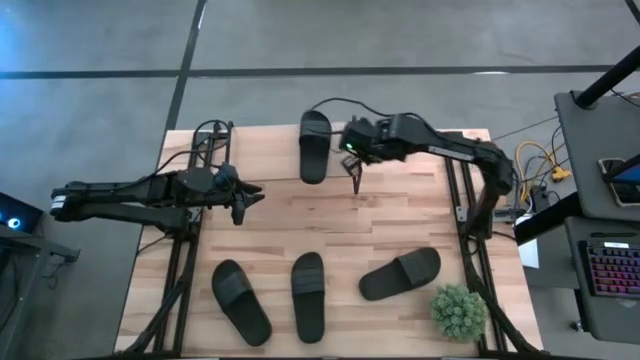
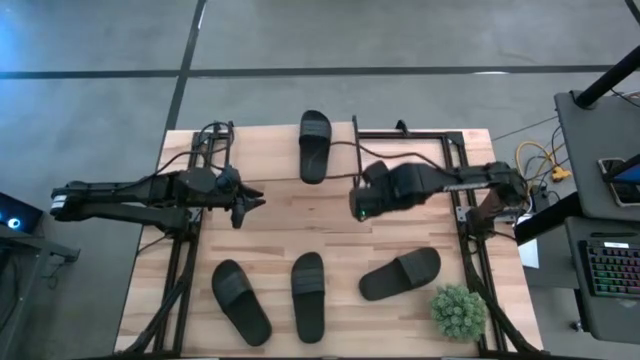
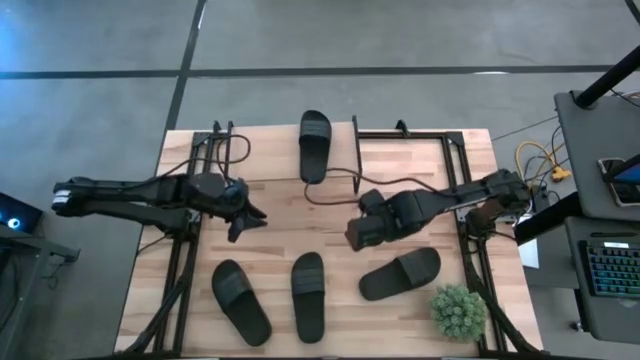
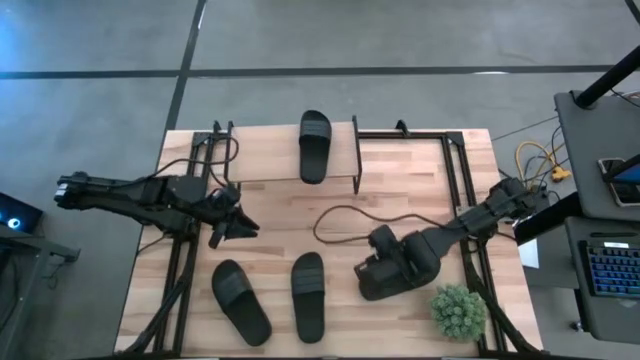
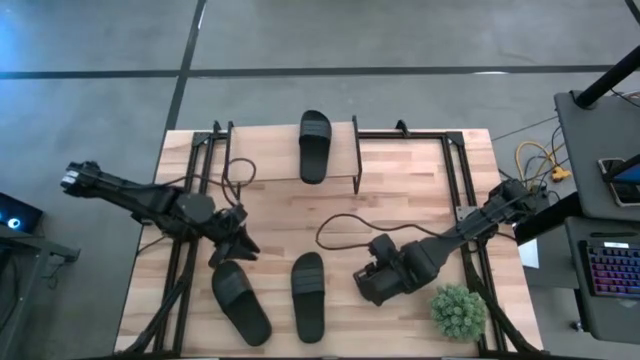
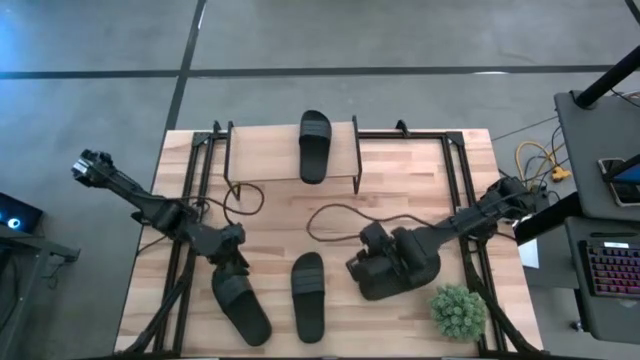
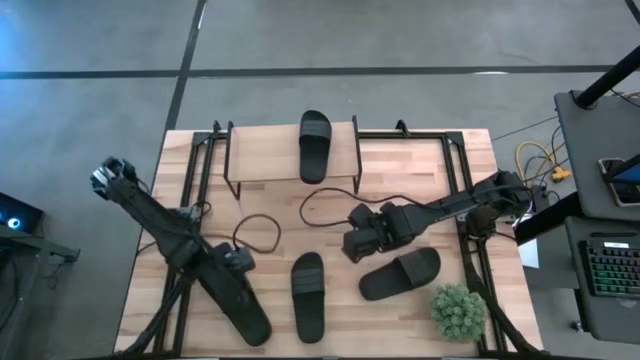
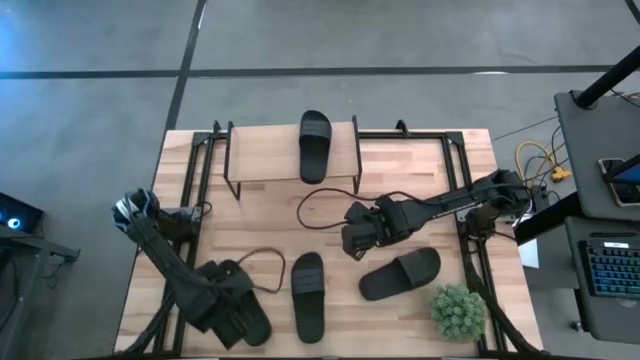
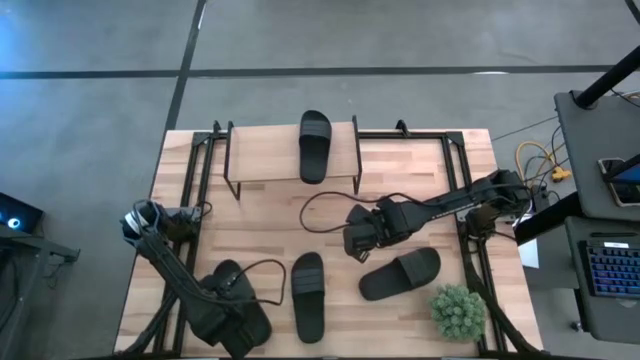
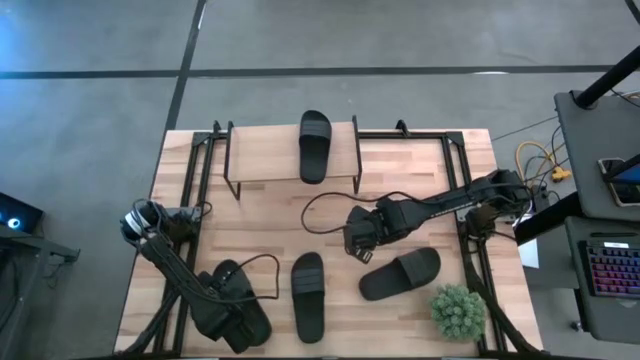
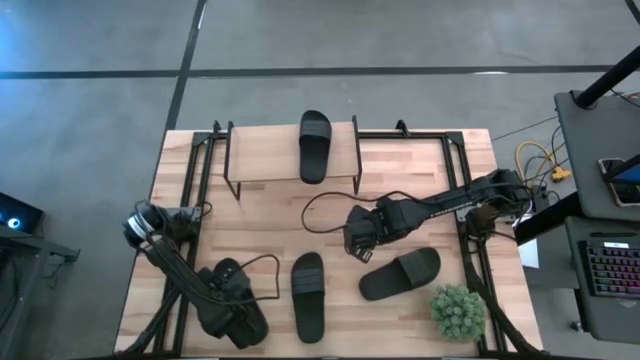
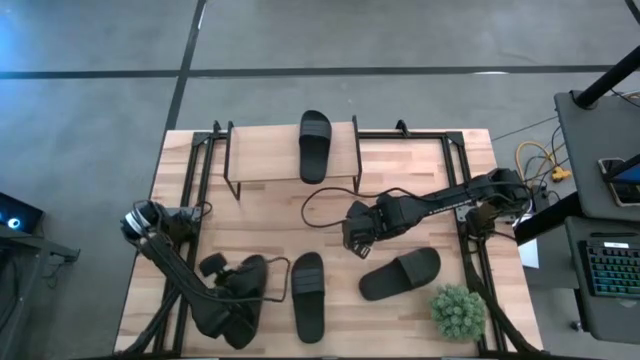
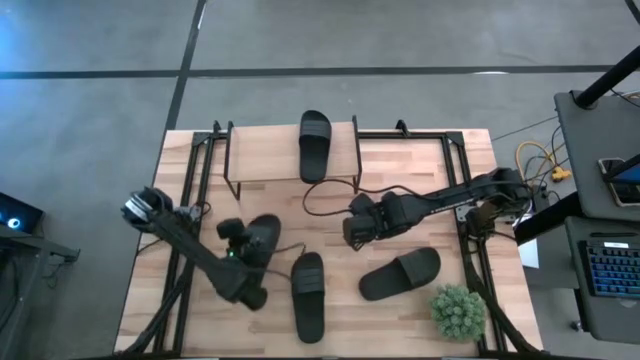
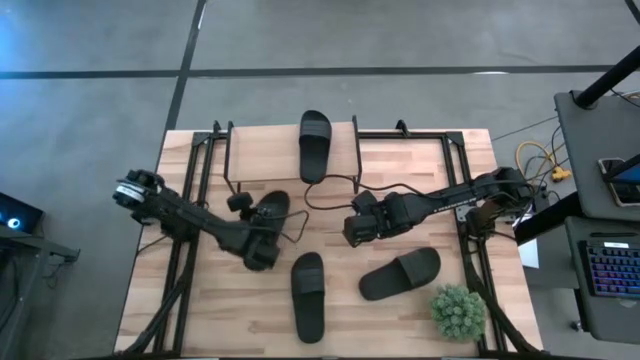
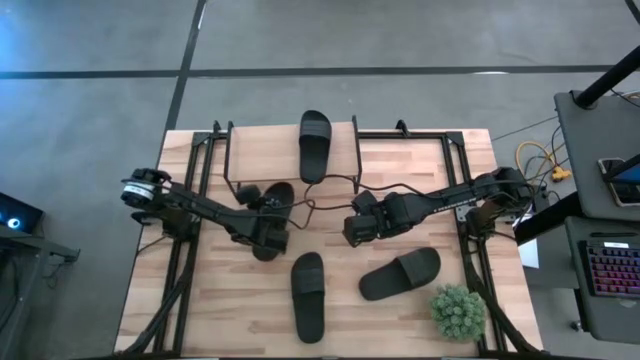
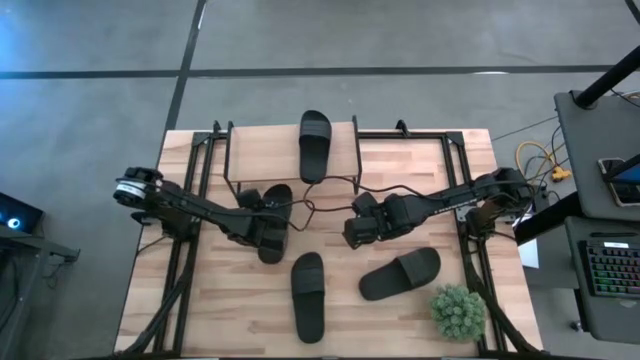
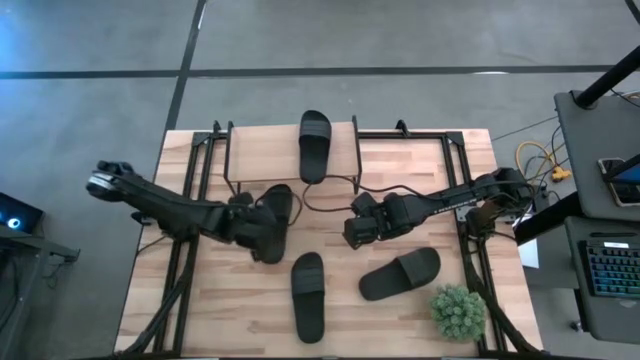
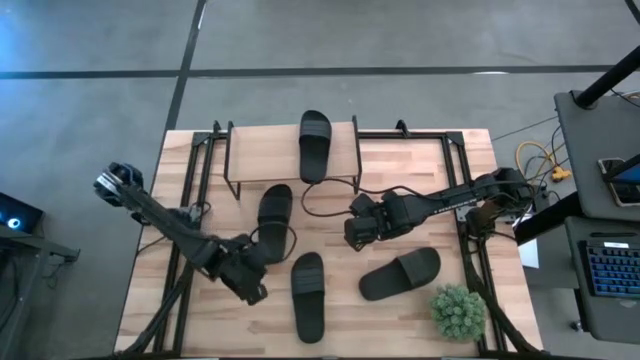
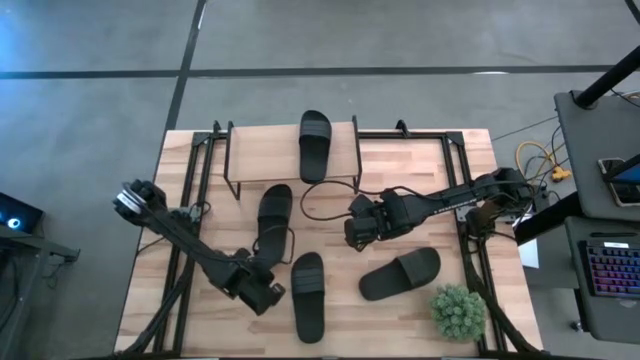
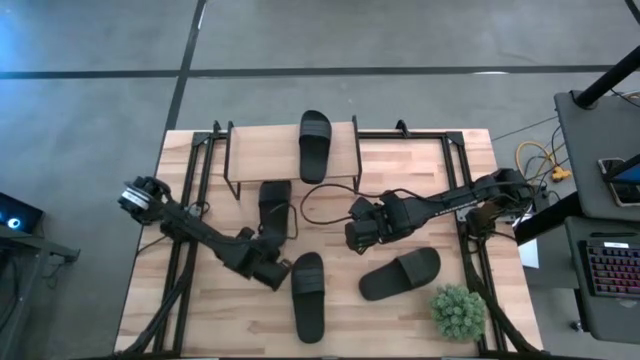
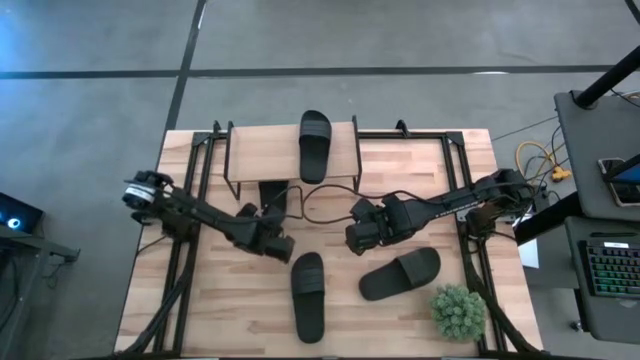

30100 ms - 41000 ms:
Task: Pick and place slides into the shelf
Put the left big black slide under the shelf

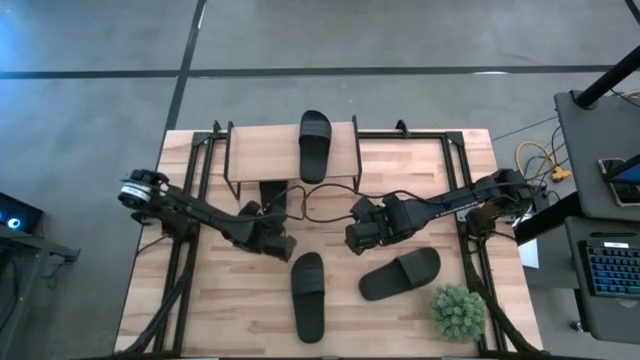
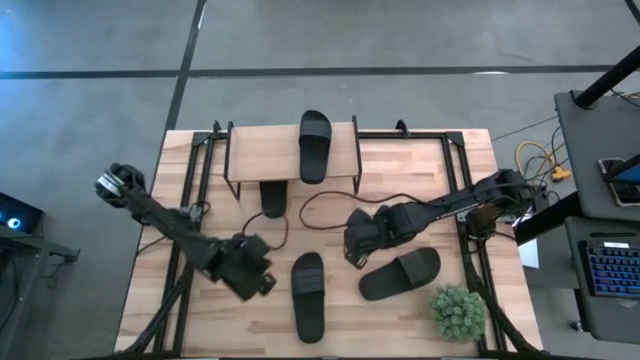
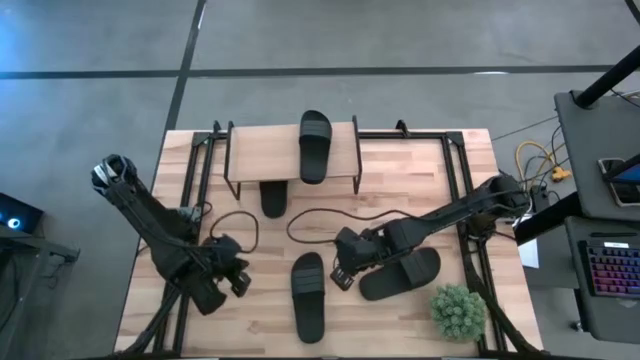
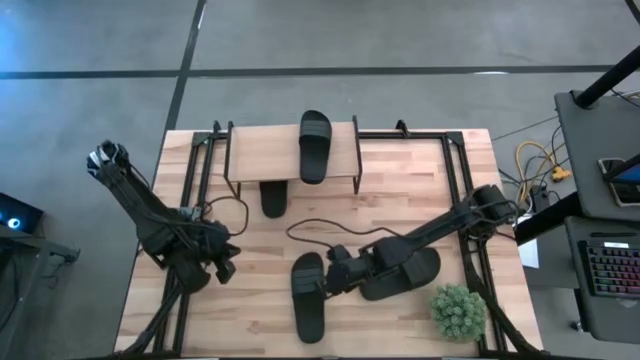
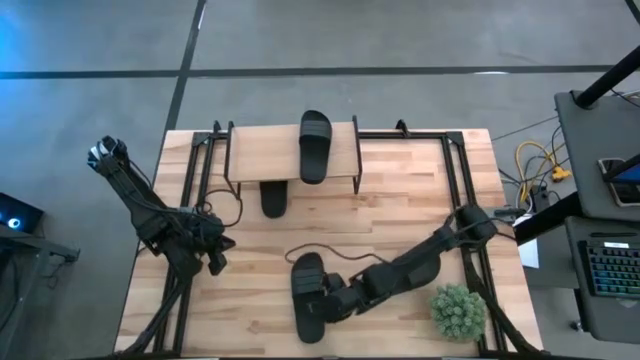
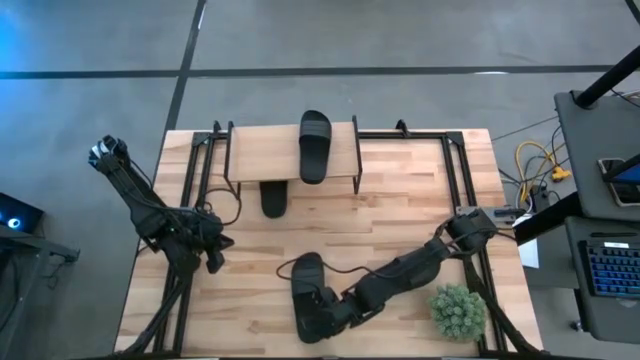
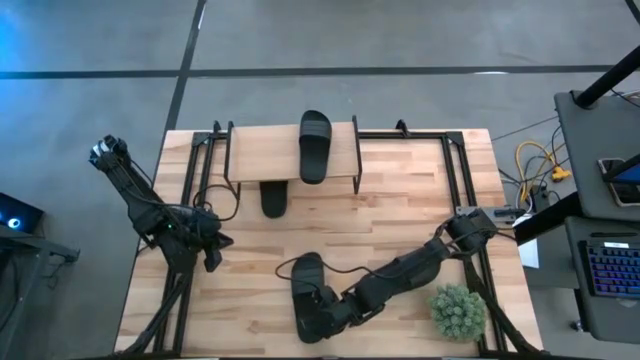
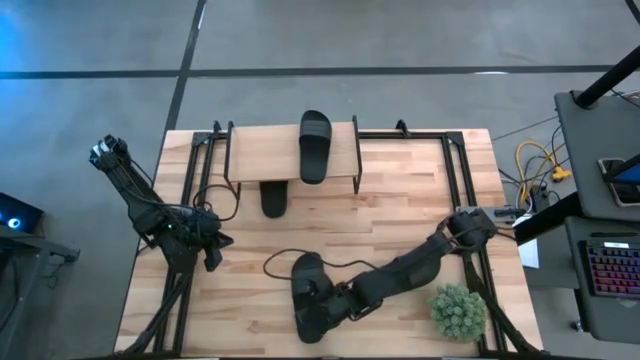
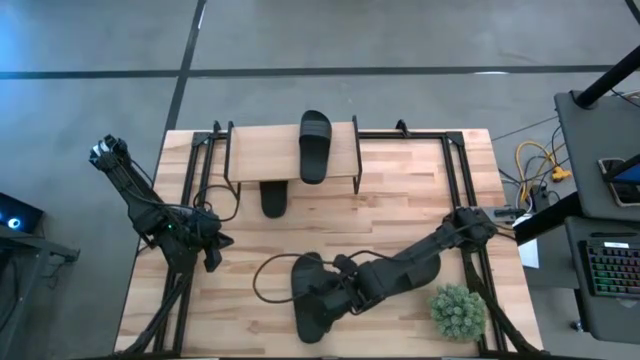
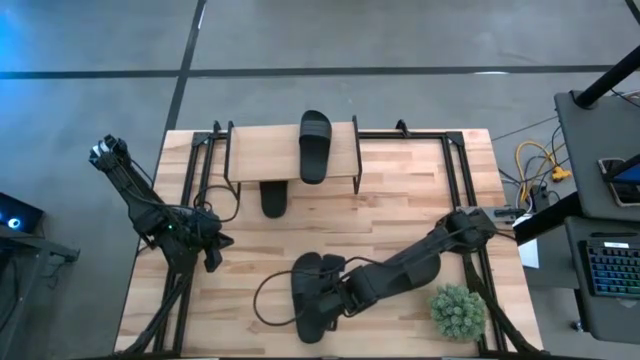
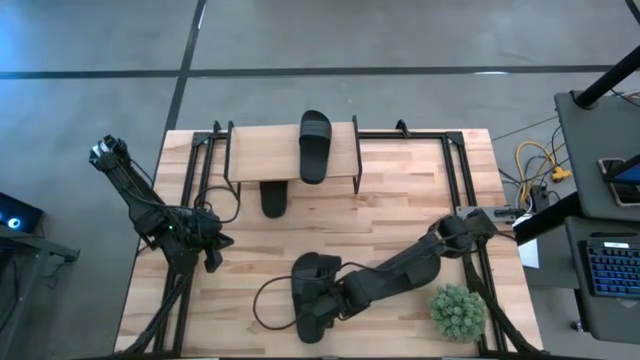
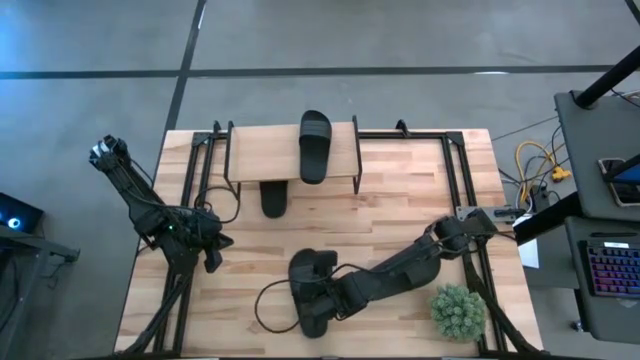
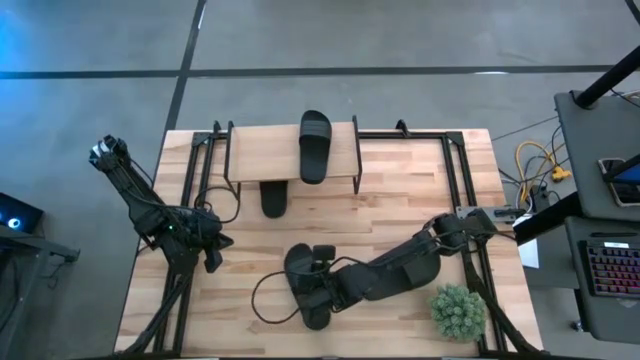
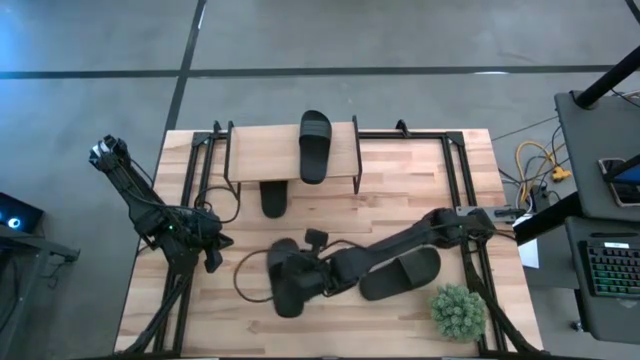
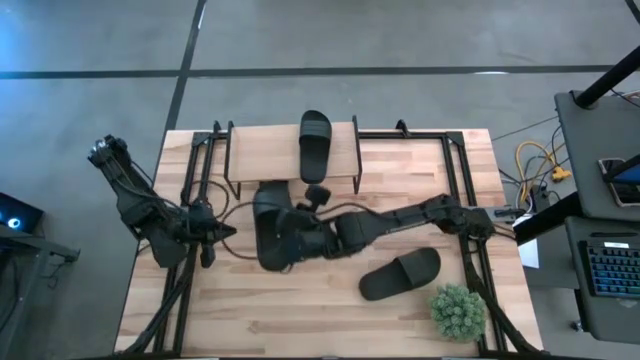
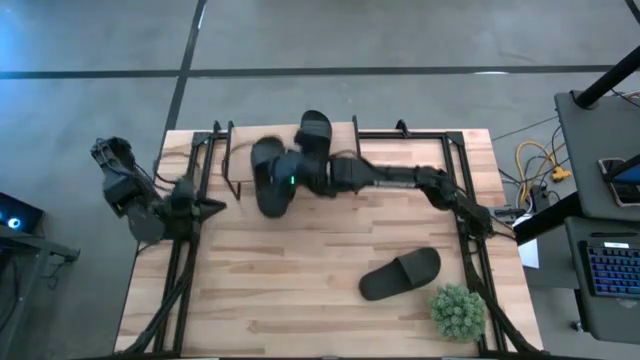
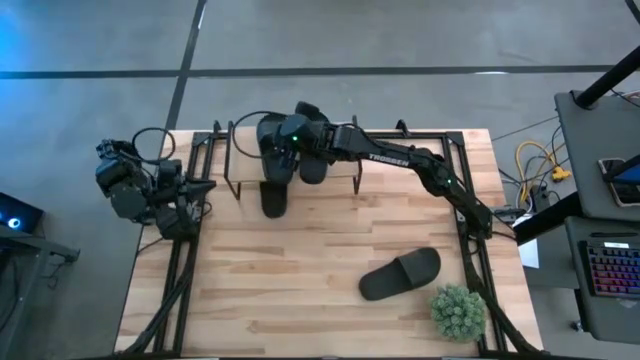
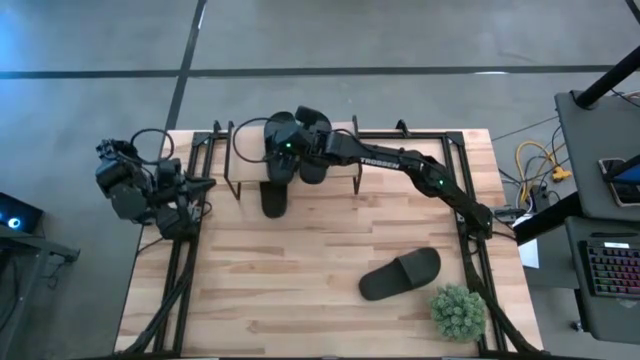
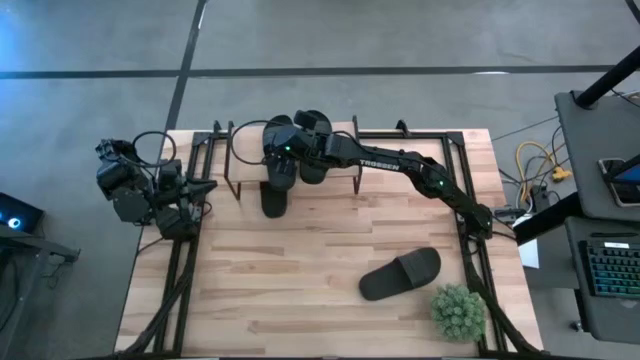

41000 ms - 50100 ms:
Put the small black slide on the shelf

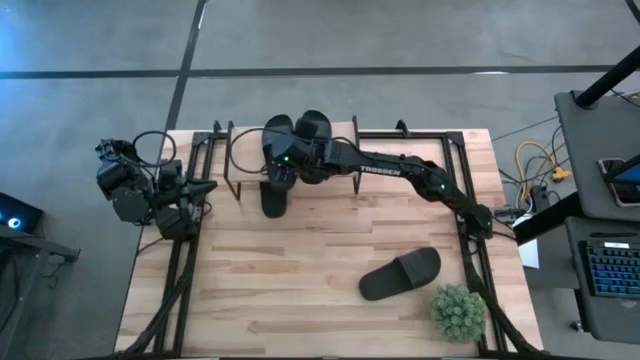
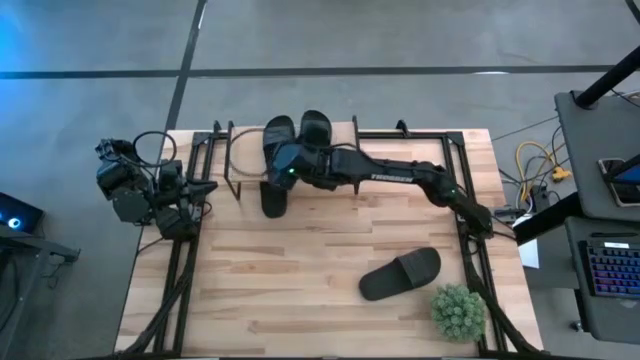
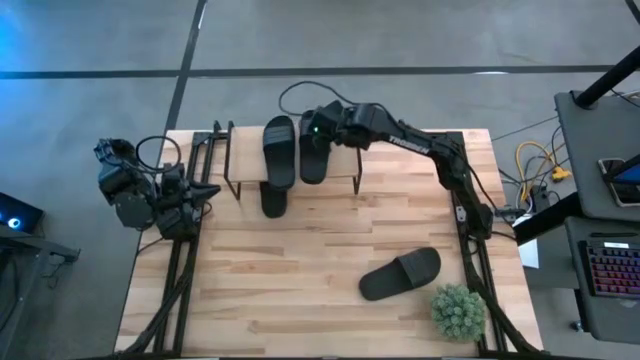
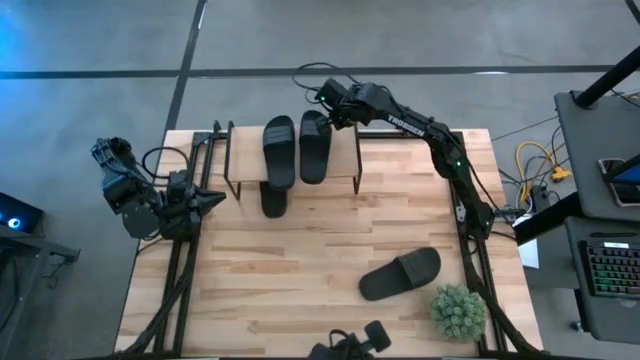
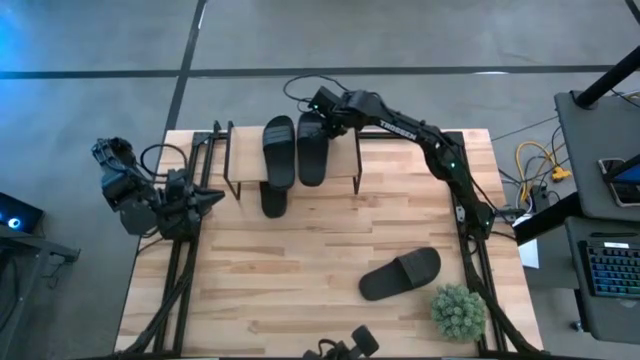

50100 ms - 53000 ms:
Adjust the small black slide on the shelf
